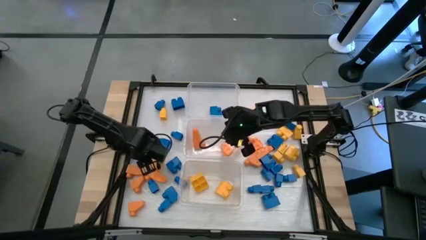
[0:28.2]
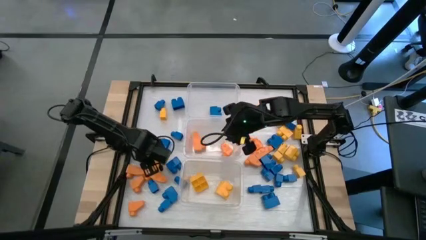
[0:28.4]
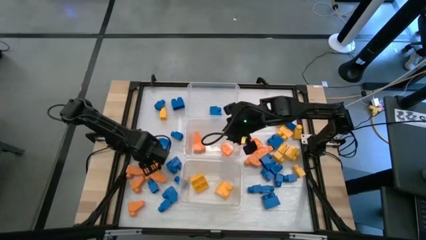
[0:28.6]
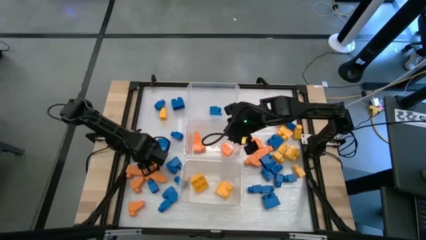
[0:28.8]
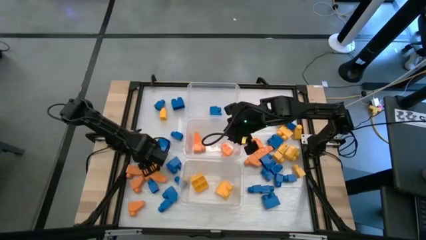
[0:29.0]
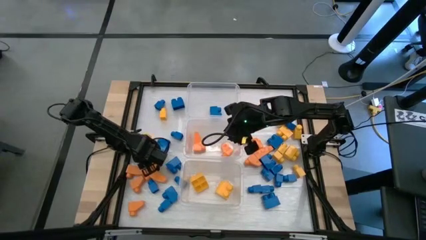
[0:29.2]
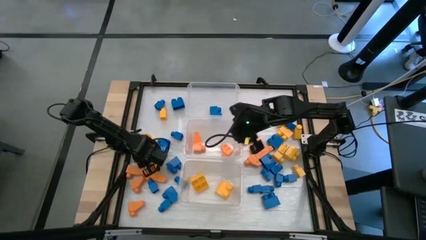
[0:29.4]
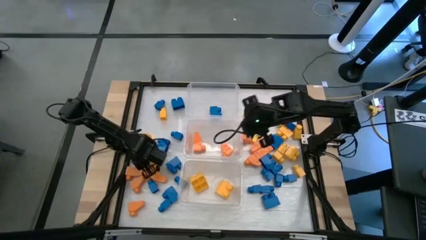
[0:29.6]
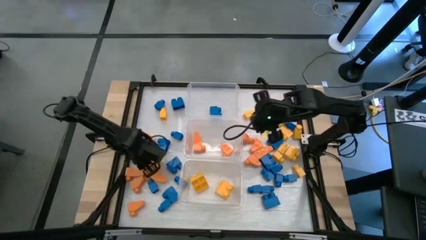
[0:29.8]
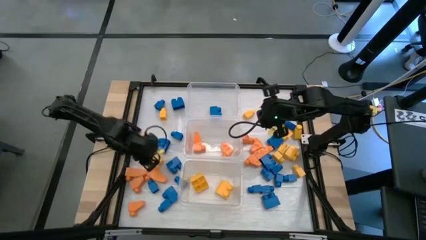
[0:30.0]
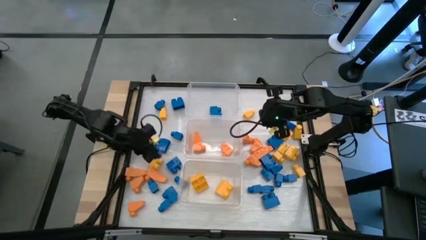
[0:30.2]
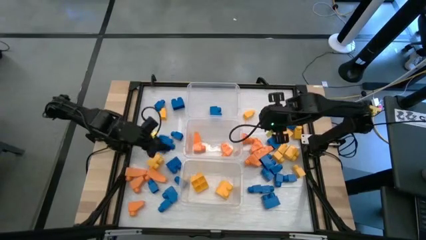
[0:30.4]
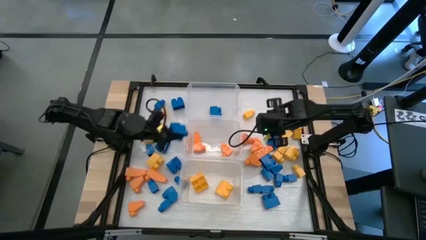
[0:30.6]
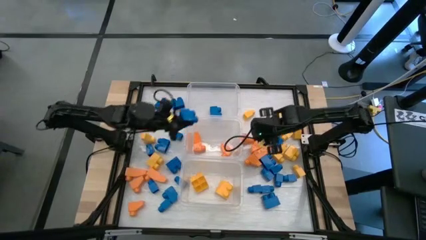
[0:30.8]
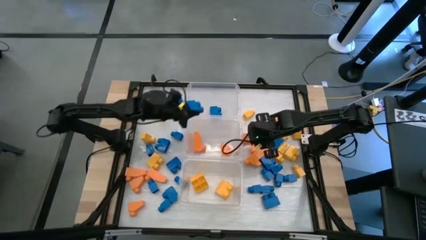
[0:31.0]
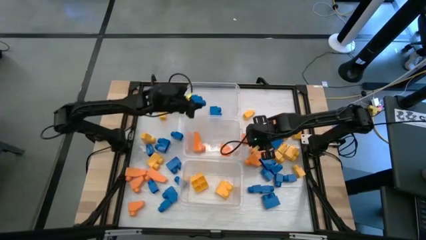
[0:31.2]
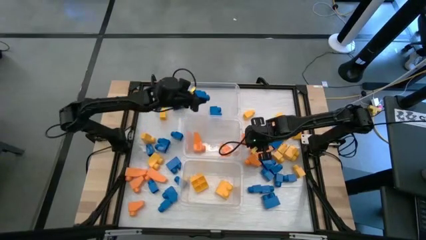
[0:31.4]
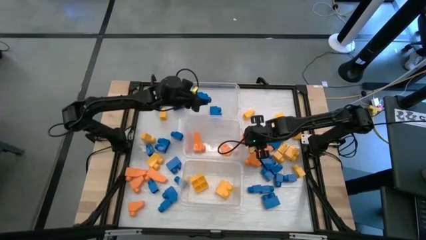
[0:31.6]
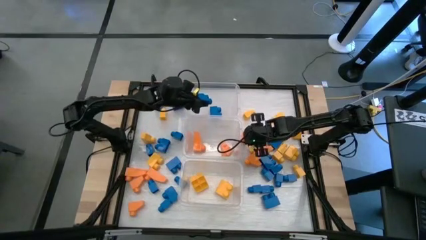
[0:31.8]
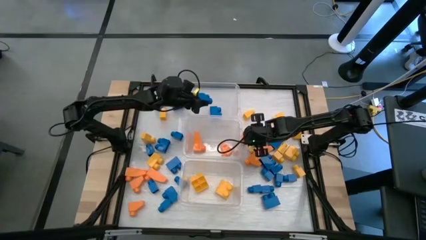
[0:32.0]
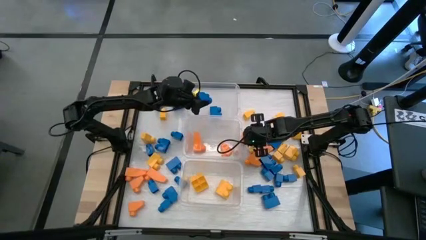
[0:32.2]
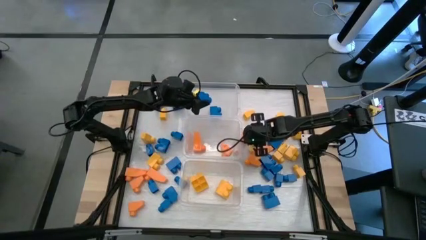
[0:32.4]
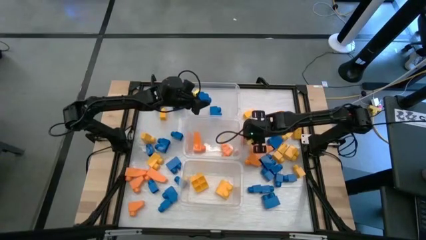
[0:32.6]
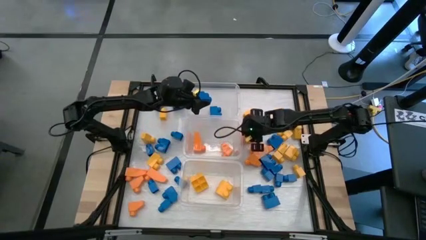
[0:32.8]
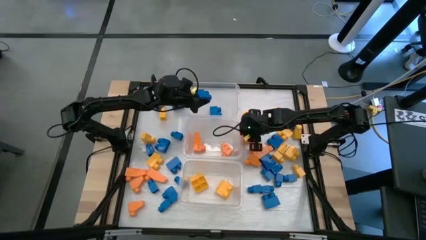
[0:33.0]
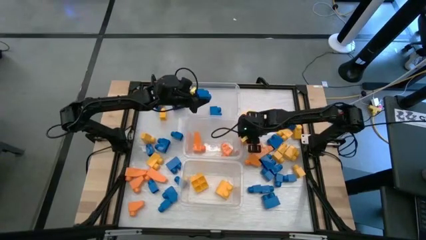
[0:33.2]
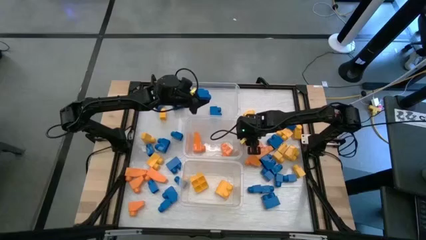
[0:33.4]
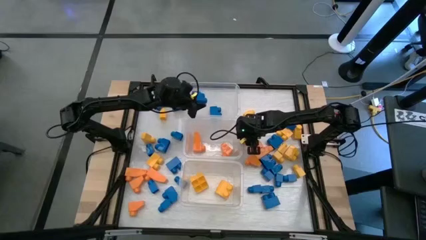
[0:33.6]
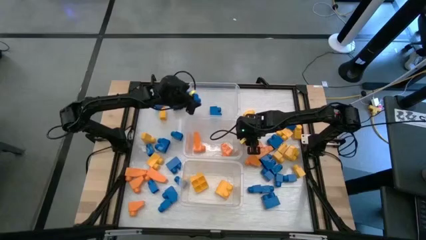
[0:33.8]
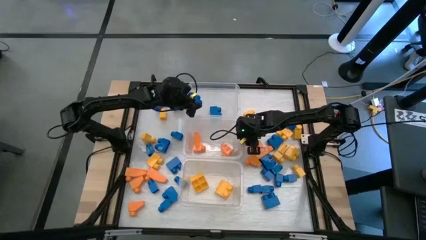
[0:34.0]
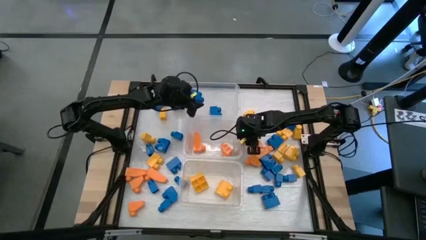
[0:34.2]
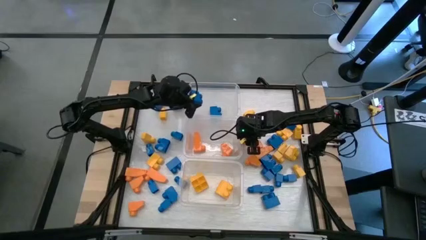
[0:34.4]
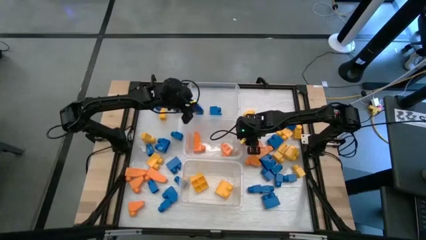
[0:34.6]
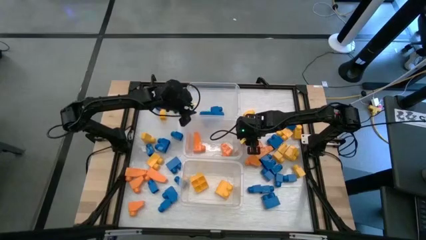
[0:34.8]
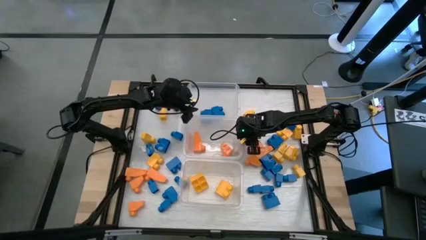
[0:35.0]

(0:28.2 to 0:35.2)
Task: Sort blocks
Put the blue game piece into the top transparent bin

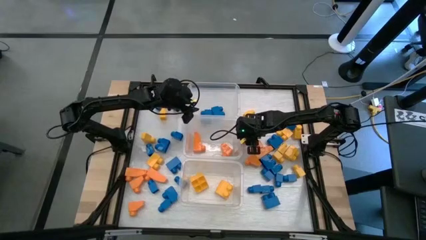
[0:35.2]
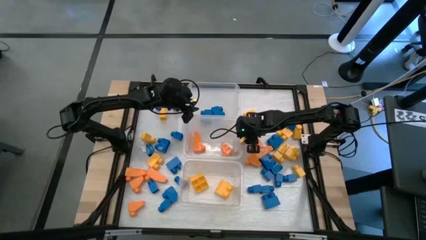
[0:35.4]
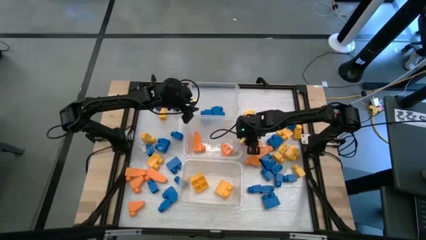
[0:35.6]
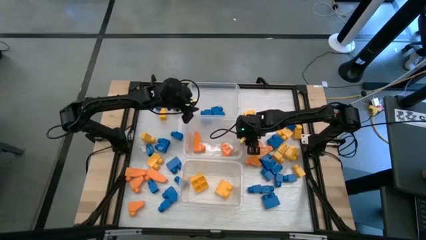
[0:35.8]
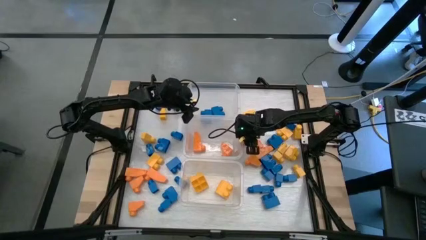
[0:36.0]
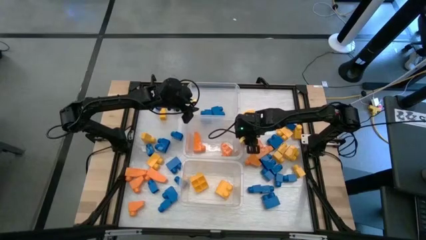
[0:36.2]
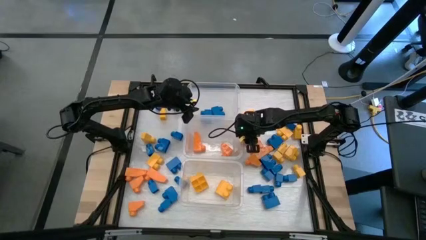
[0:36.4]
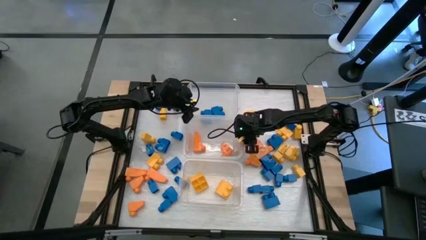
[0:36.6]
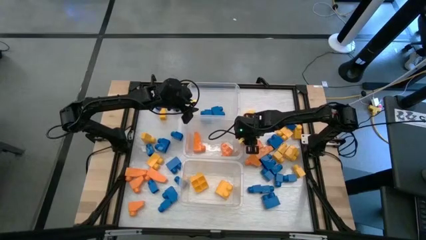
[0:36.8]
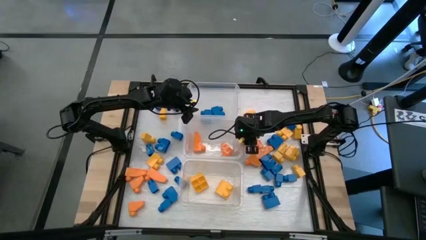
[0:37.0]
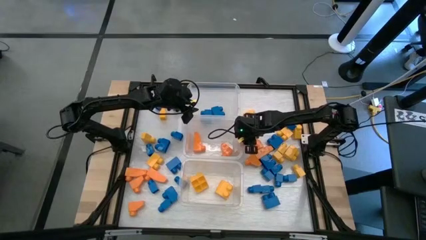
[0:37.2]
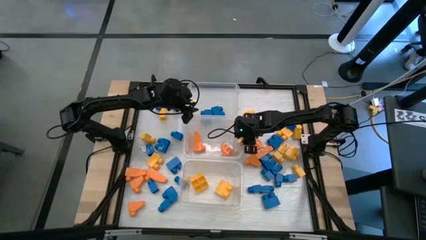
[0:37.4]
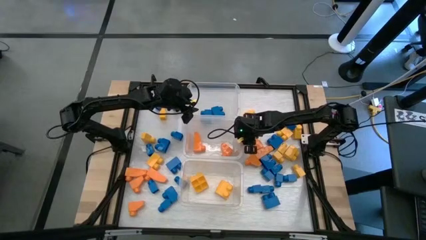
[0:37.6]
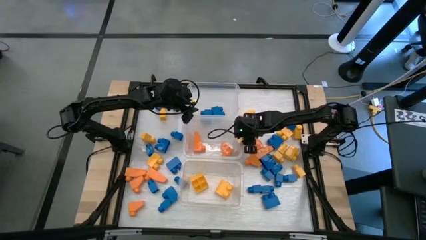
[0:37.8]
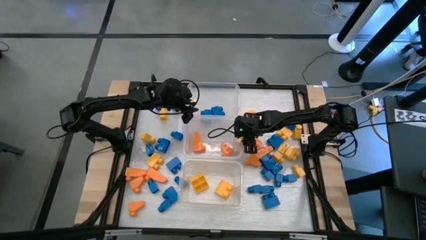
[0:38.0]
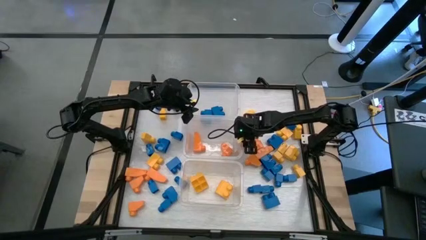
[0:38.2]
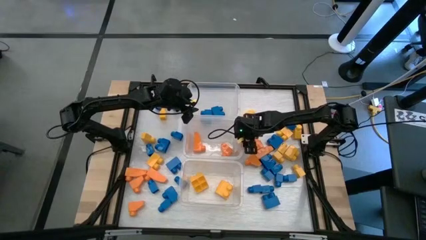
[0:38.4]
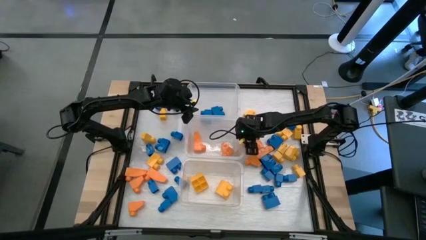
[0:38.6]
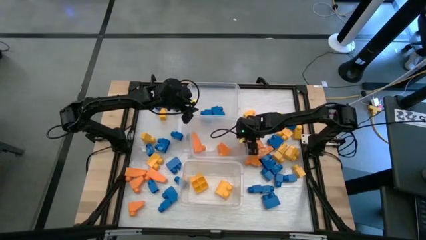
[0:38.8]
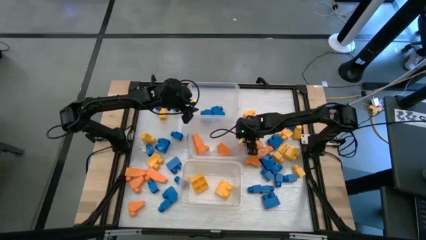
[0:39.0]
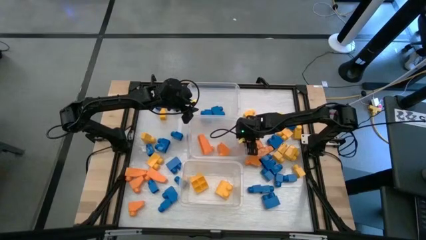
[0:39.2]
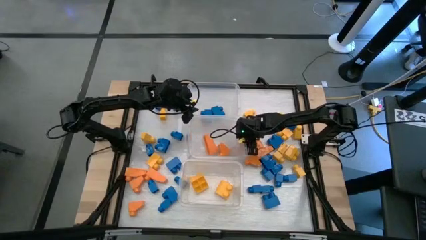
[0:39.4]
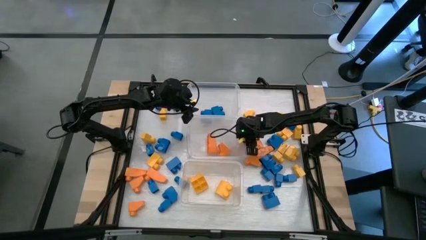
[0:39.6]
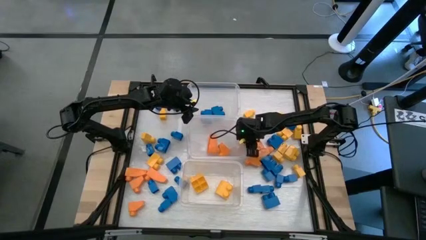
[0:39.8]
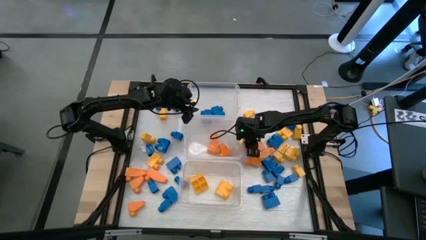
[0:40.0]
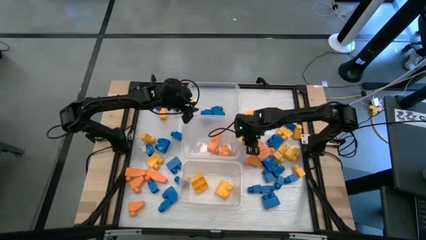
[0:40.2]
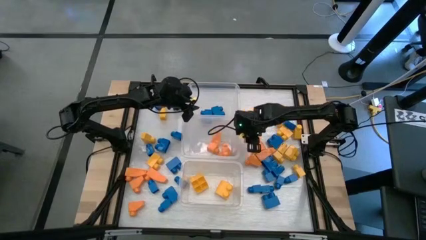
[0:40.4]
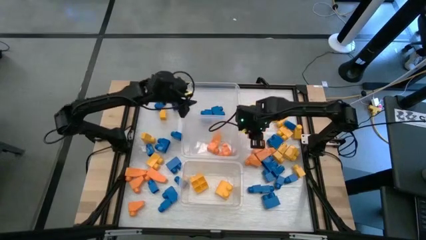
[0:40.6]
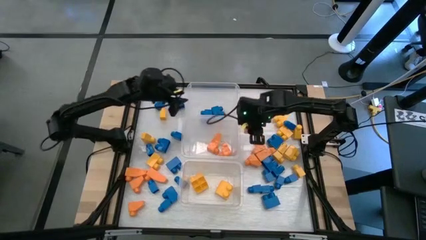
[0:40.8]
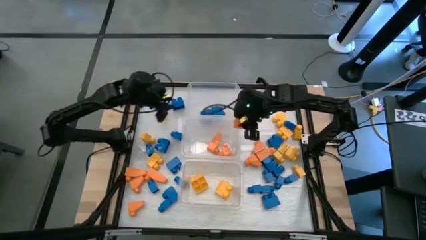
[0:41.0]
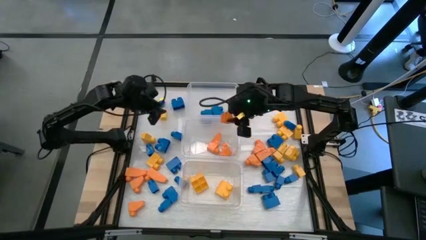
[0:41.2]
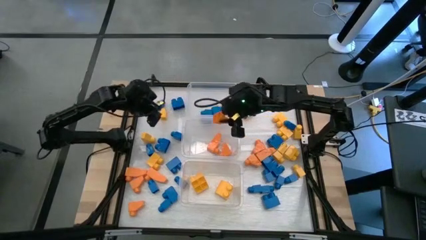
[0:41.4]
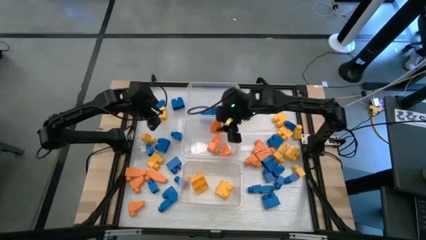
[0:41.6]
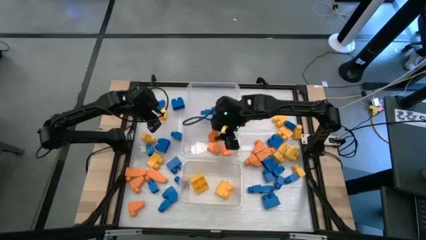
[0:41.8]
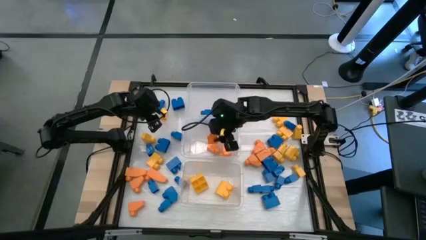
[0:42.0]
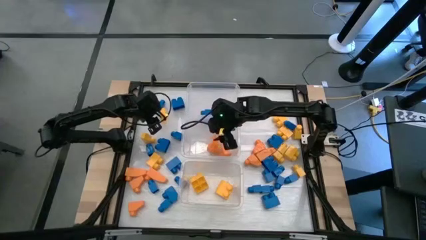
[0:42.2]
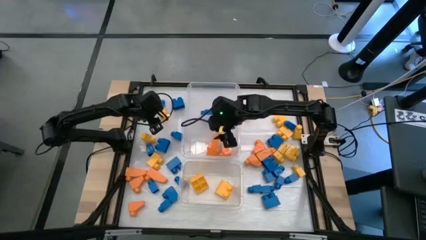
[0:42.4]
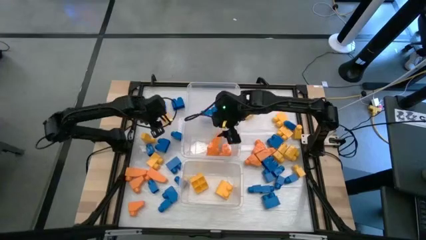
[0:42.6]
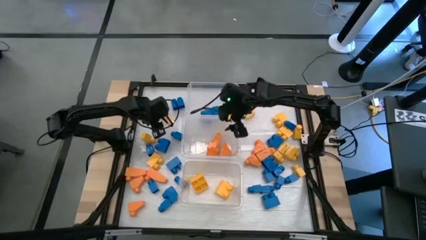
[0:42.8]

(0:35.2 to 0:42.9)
Put the orange game piece into the middle transparent bin

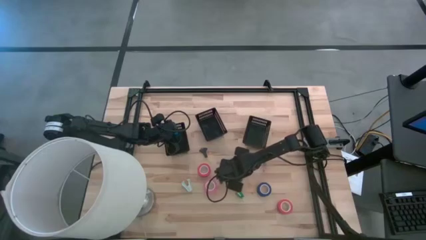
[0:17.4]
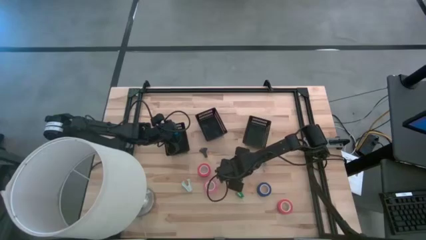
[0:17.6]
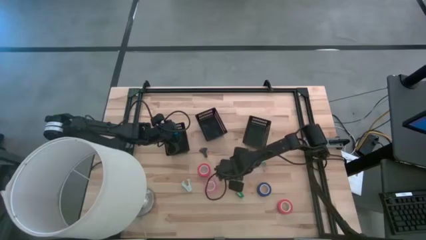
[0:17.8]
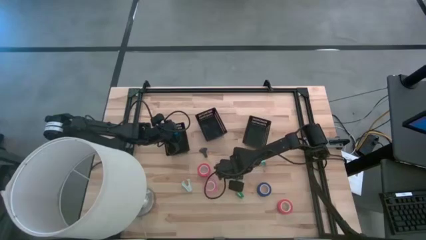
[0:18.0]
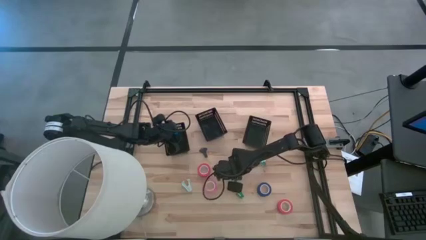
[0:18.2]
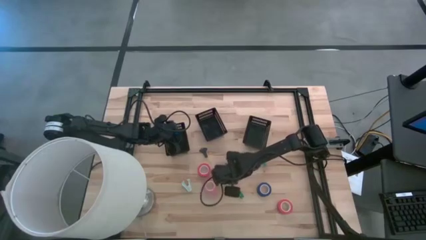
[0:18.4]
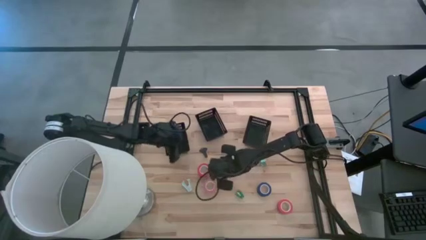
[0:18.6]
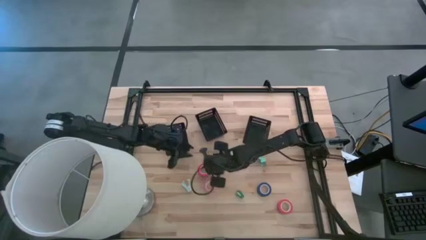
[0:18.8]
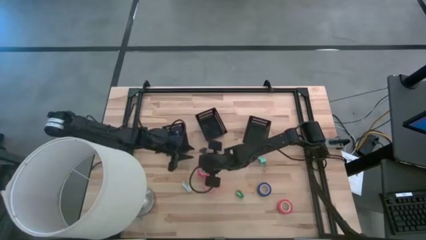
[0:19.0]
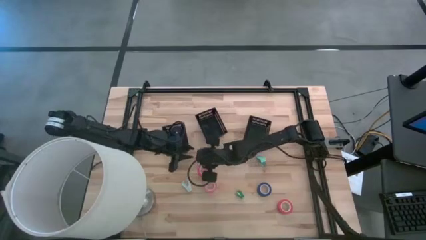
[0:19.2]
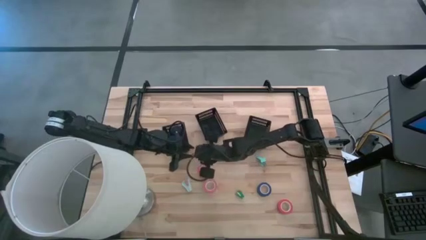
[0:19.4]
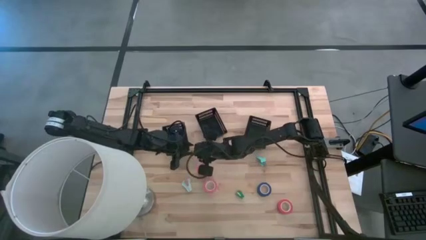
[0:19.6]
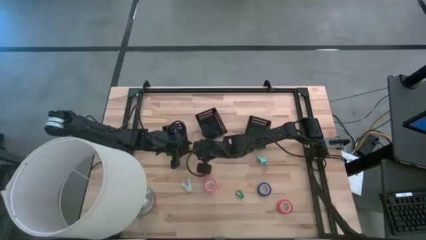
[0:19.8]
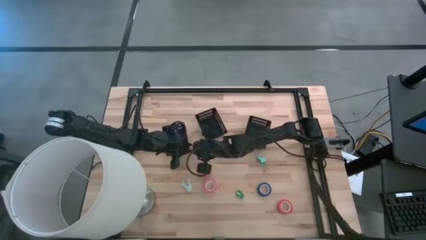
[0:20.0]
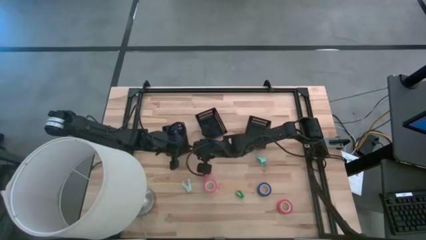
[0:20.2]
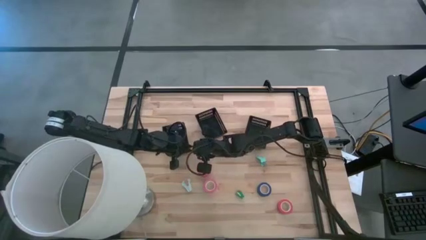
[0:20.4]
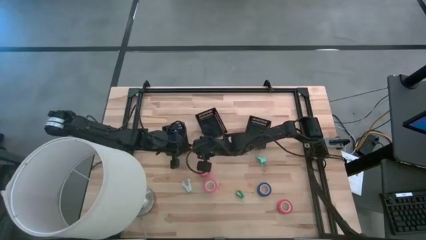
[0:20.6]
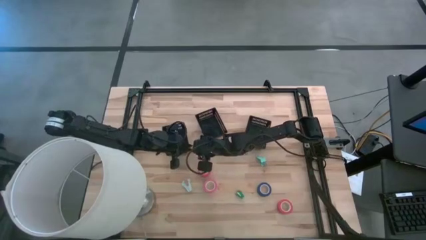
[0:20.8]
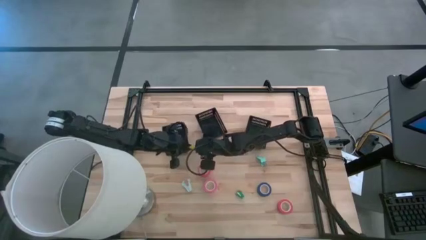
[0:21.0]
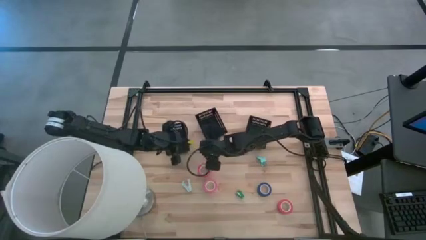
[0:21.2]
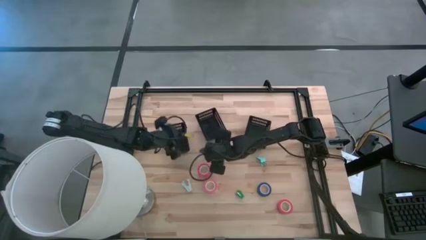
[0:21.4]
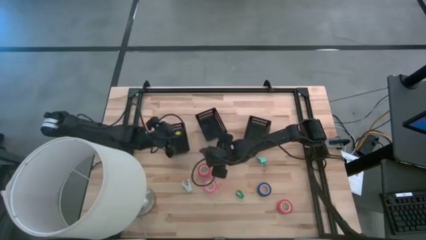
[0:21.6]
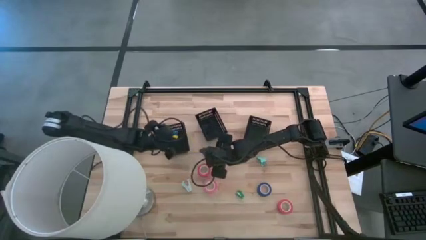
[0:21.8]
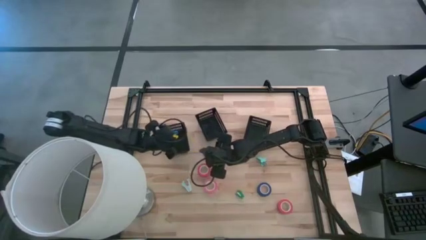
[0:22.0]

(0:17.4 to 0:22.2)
Task: Pick and place Stapler, Stapler remover, tape
Put the yellow stapler into the left black bin
